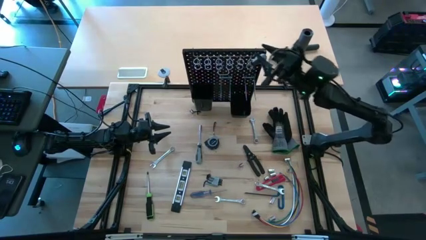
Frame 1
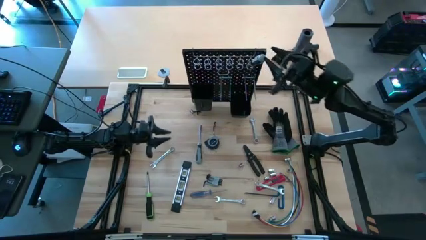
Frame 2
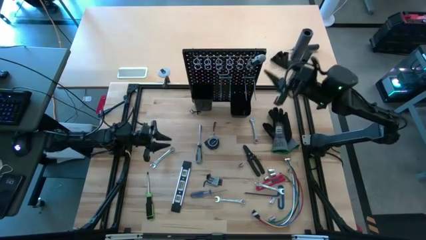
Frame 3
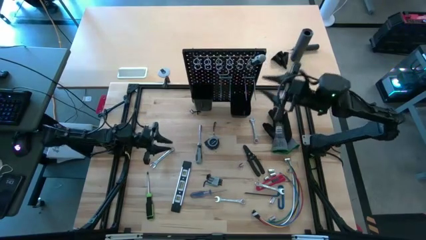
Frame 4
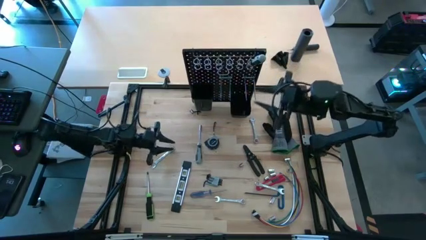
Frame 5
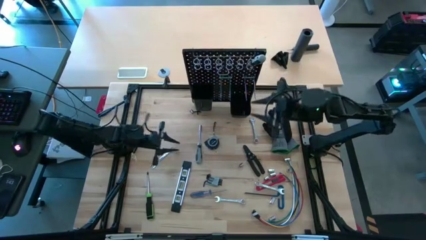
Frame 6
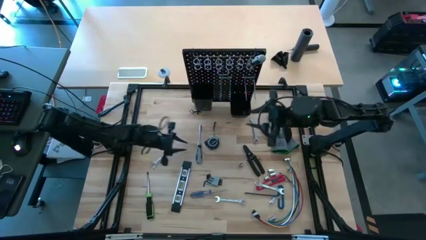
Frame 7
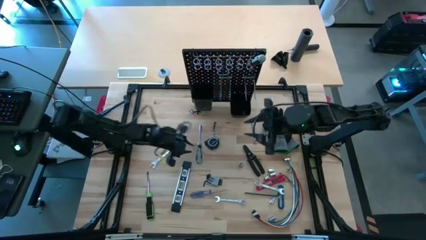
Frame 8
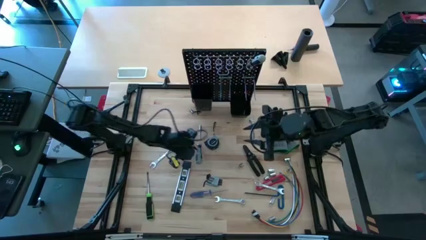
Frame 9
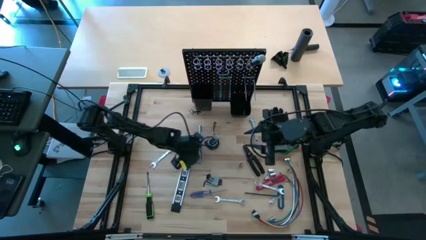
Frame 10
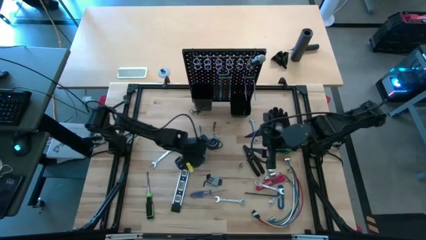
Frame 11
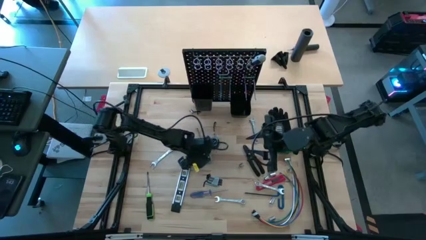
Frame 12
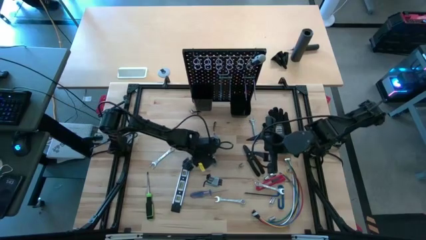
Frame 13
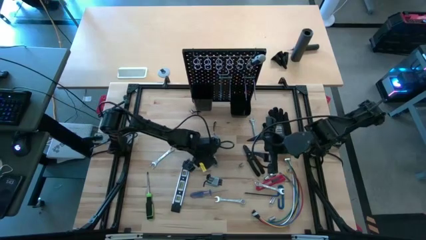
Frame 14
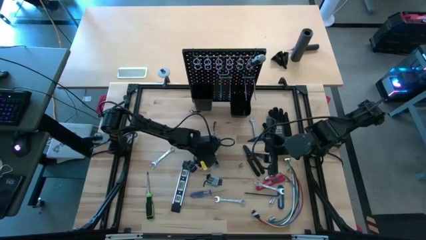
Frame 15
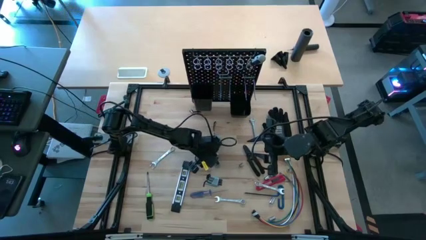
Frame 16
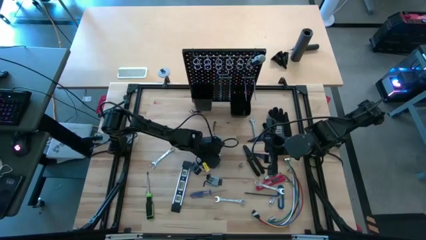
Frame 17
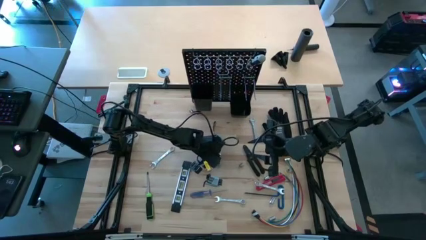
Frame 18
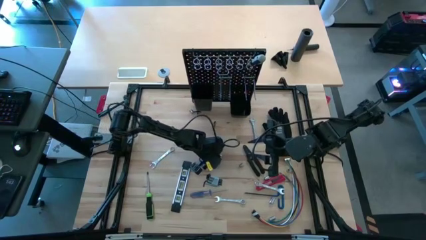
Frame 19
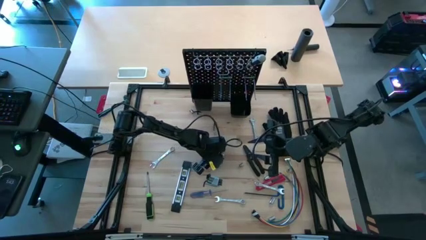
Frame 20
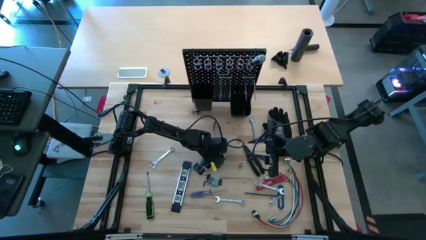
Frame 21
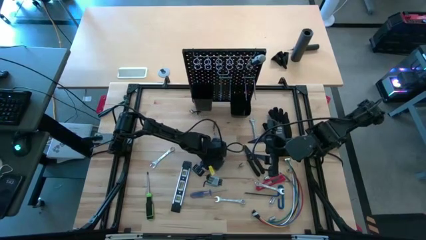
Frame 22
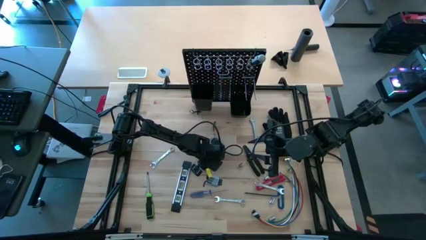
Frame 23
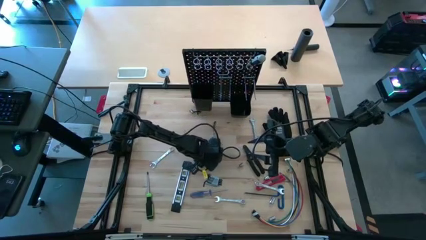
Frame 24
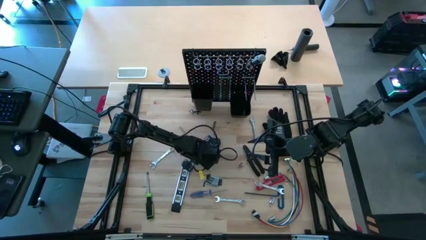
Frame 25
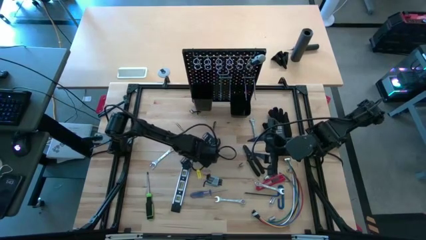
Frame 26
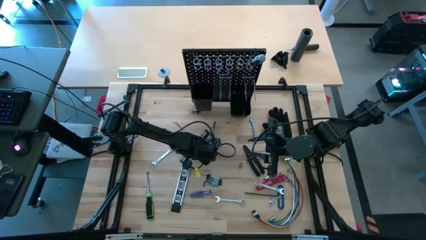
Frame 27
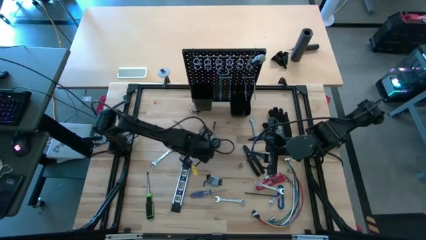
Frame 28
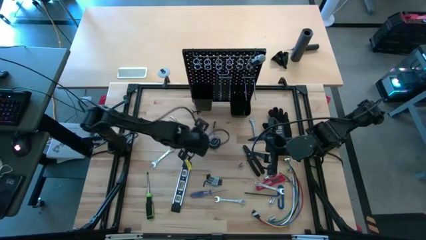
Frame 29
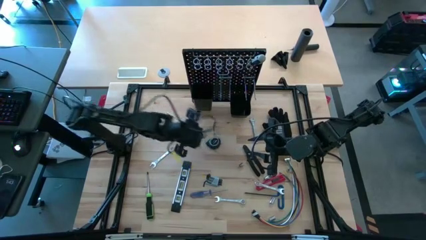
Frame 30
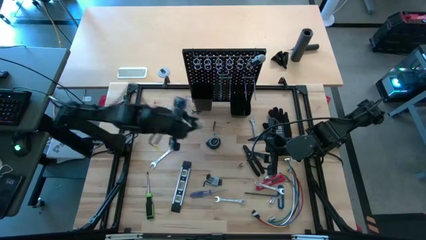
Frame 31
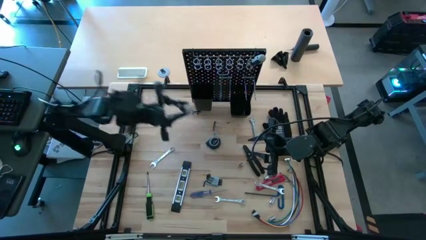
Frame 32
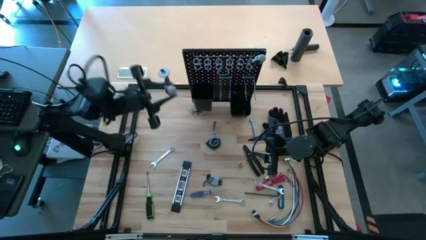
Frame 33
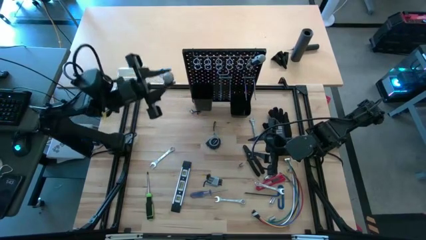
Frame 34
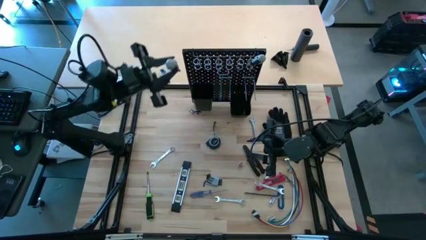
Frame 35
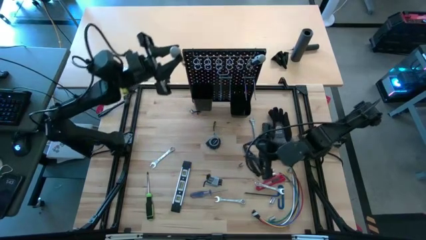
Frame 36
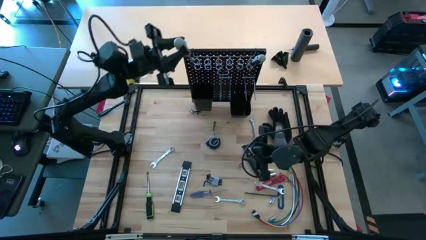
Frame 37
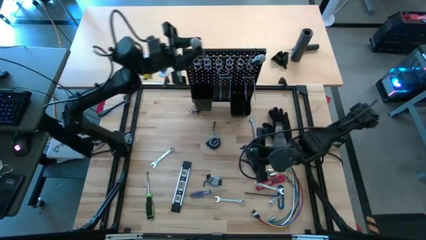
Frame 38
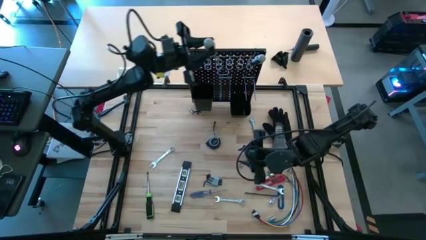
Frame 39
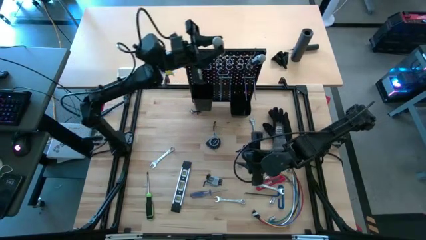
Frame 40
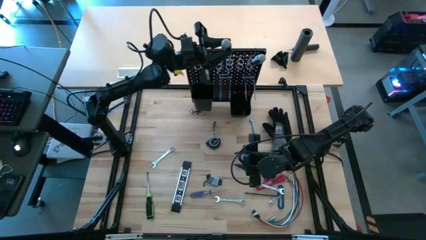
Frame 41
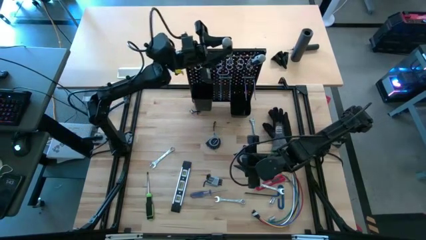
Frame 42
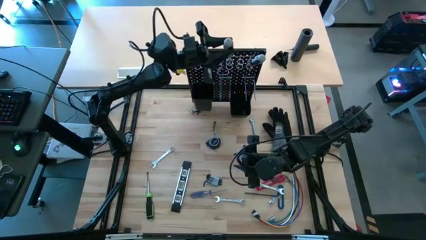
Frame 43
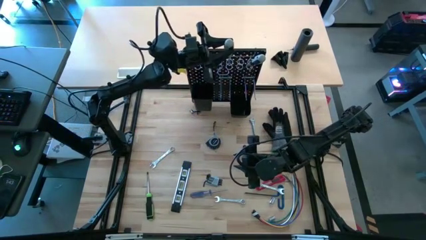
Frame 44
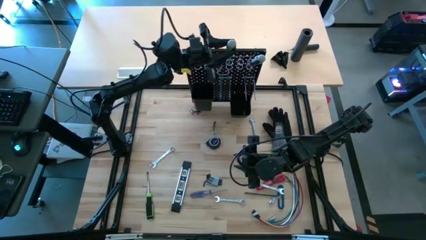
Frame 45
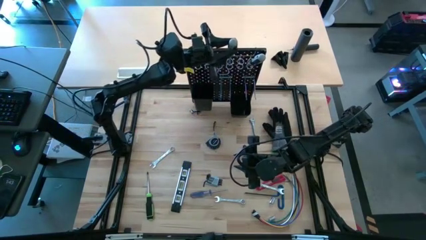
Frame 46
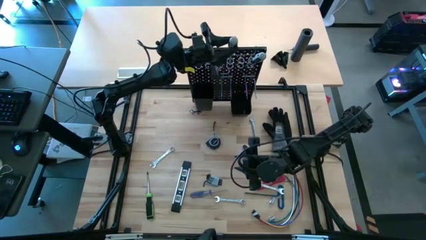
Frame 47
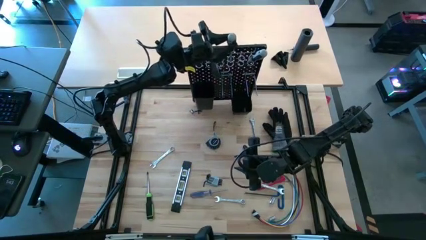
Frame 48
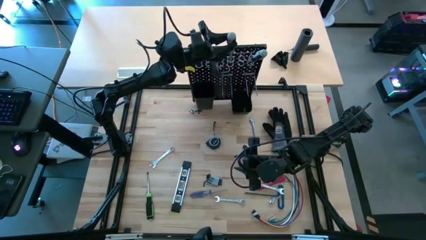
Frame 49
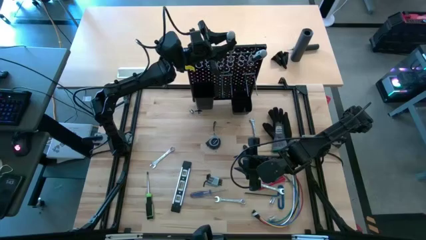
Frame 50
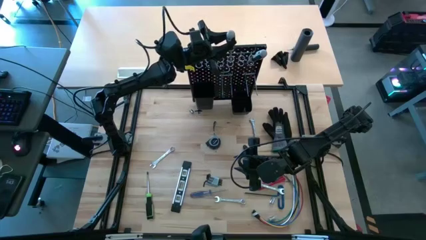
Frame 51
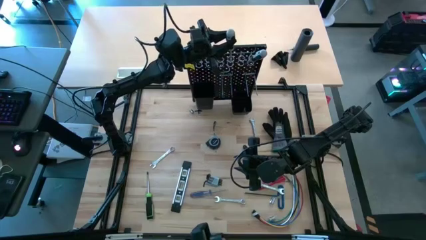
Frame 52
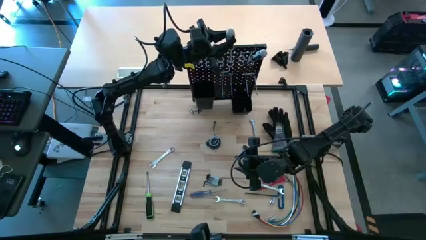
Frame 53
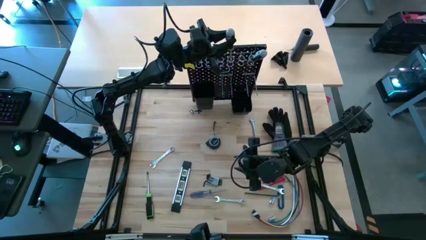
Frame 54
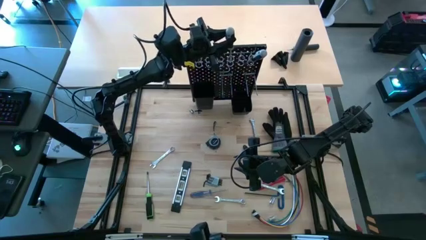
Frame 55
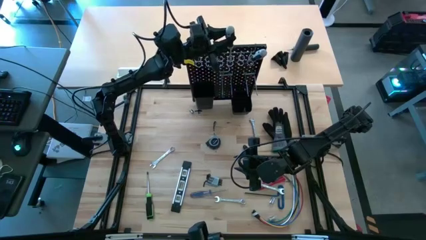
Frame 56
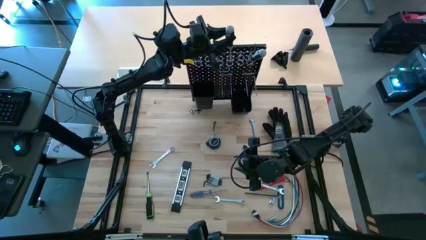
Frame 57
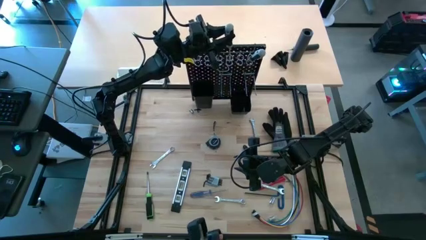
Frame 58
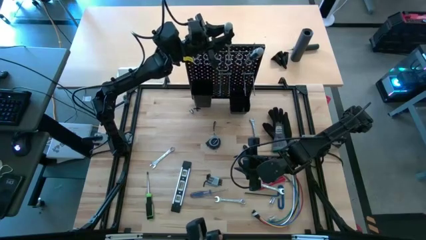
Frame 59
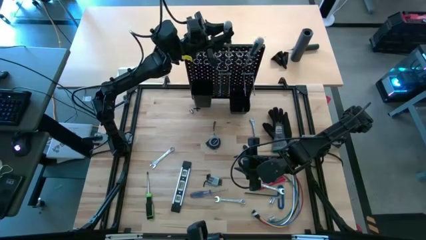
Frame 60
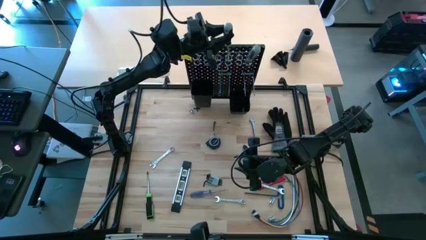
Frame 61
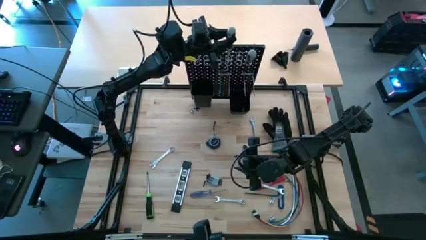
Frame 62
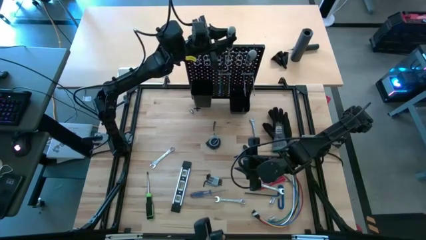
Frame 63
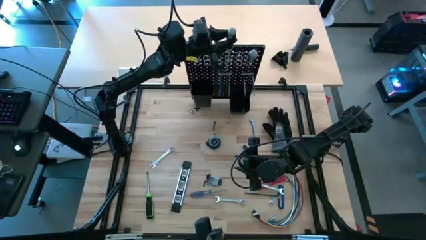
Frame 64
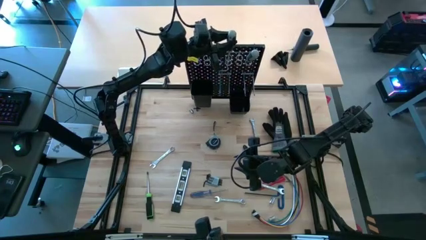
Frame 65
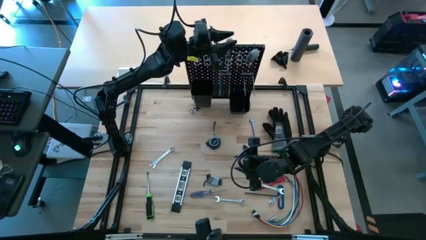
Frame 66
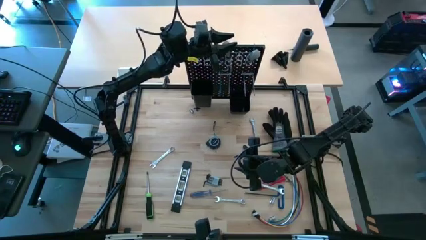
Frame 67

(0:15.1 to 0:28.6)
Task: Hang tools onto peg board
Hang the gray screwdriver on the peg board
